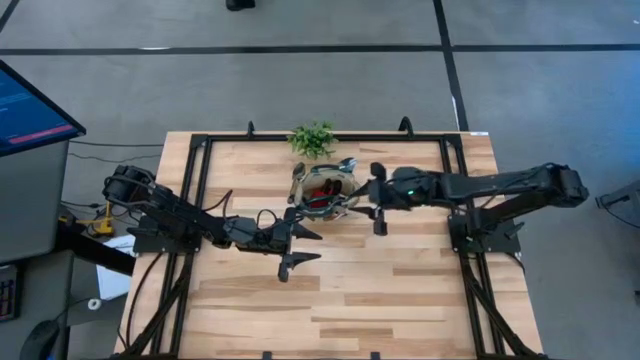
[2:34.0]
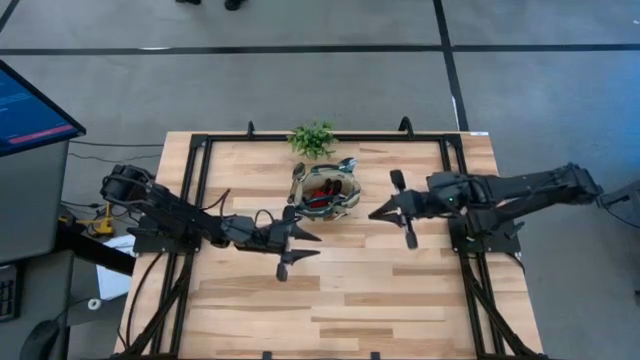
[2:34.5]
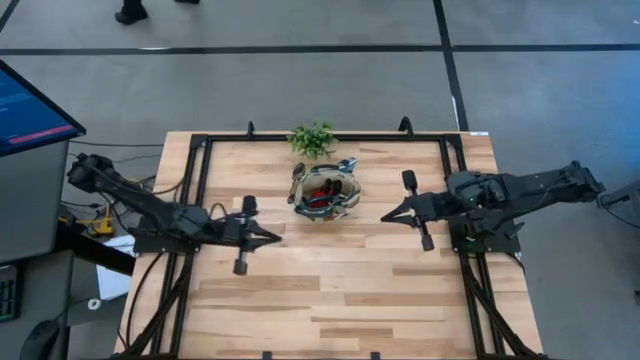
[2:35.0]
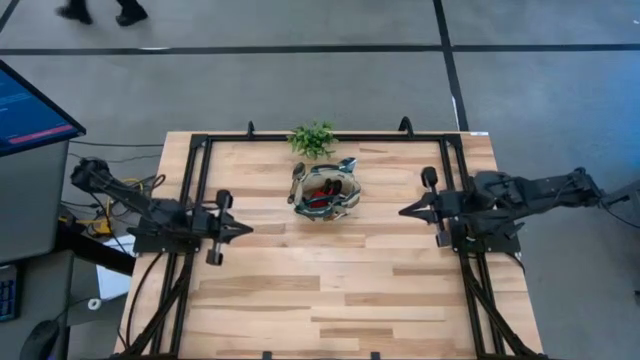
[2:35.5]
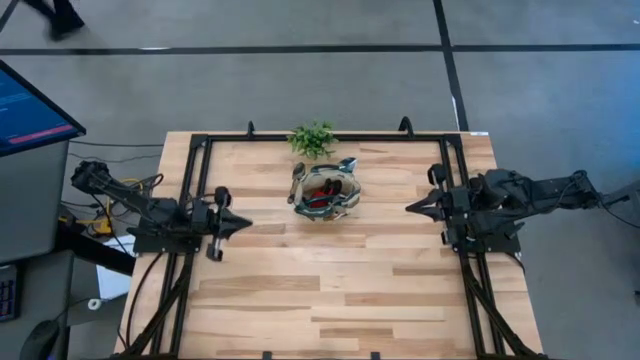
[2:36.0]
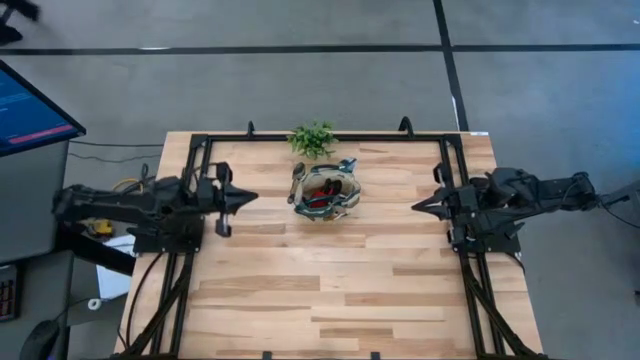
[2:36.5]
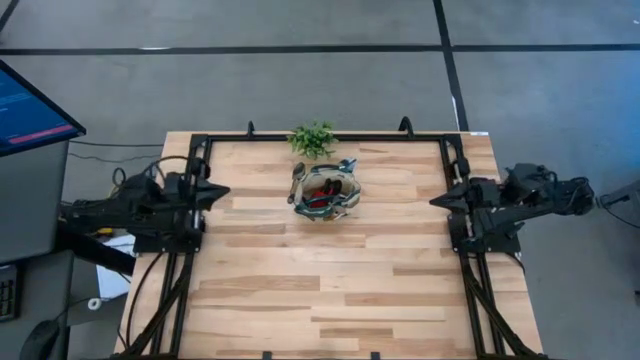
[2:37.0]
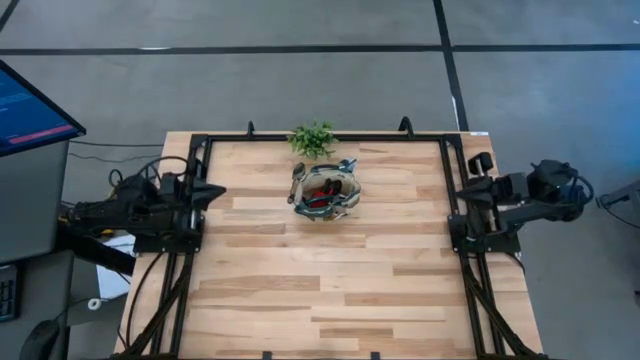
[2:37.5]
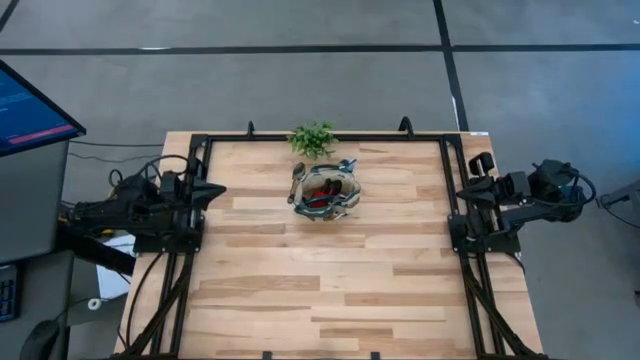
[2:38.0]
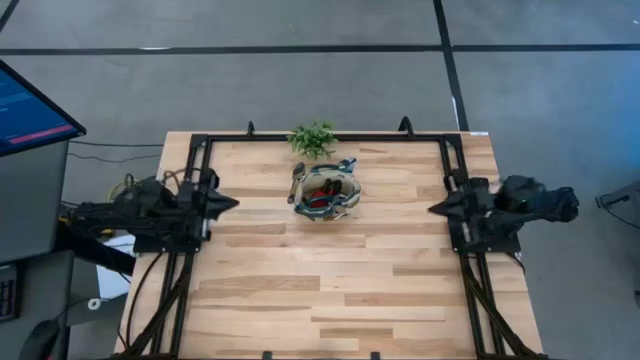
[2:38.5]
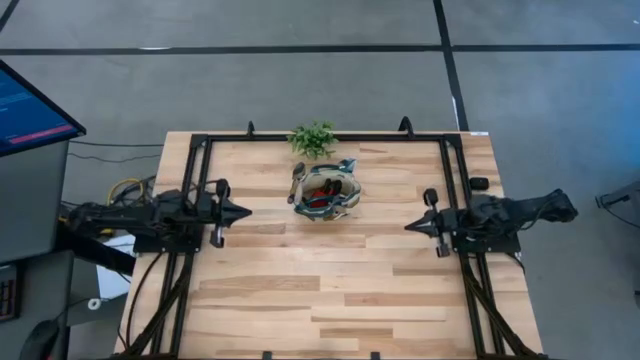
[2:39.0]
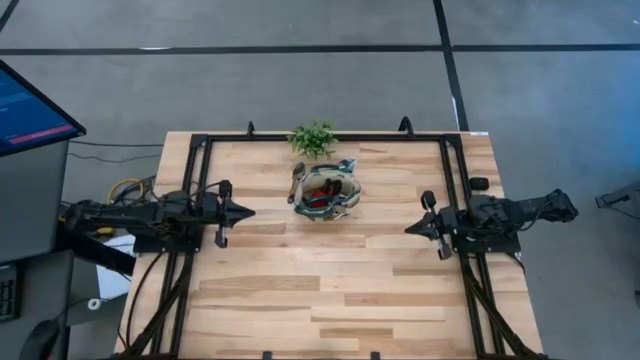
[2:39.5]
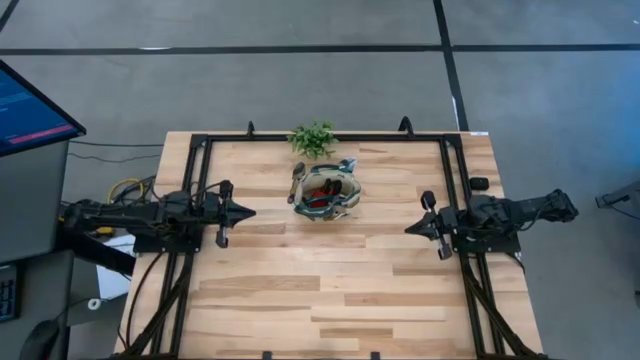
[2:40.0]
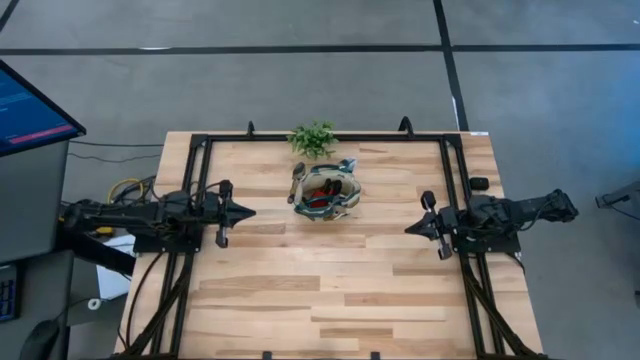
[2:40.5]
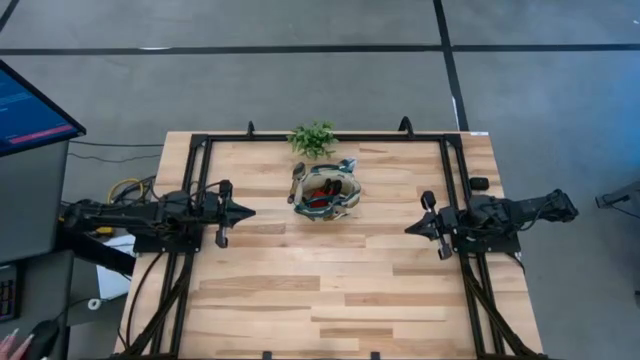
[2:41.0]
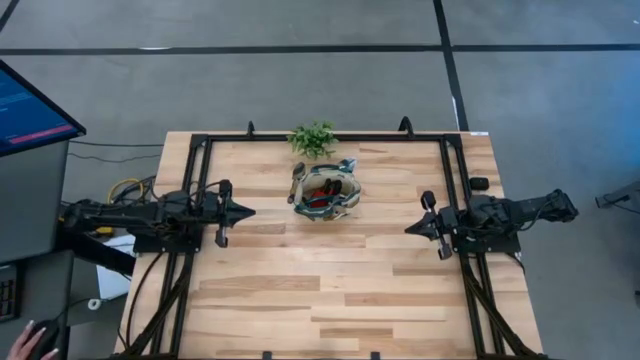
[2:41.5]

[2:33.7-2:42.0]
Task: Pick & Place Garden tools in Gardening bag
Return to Home Position

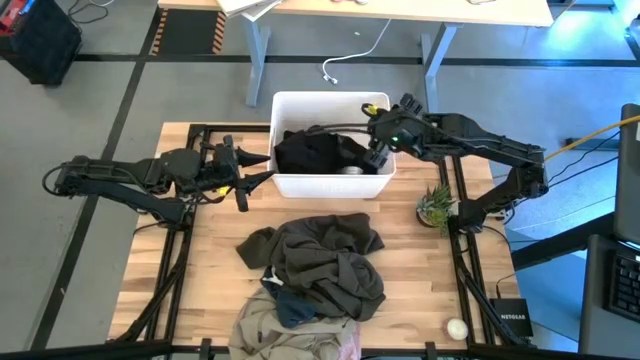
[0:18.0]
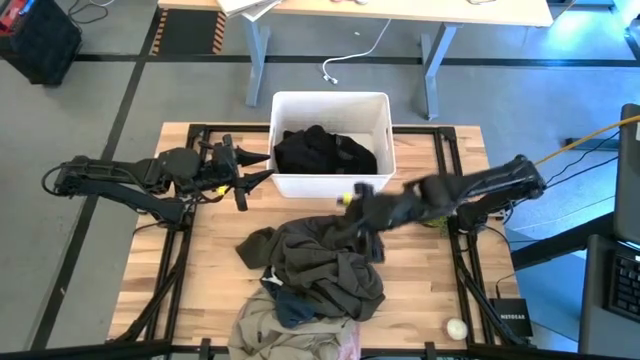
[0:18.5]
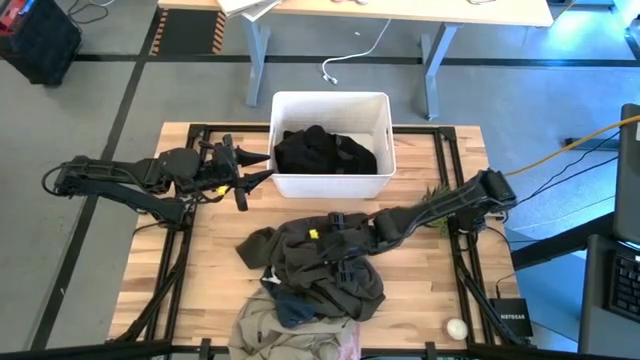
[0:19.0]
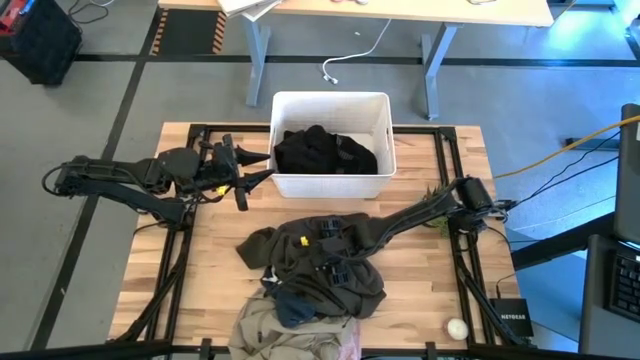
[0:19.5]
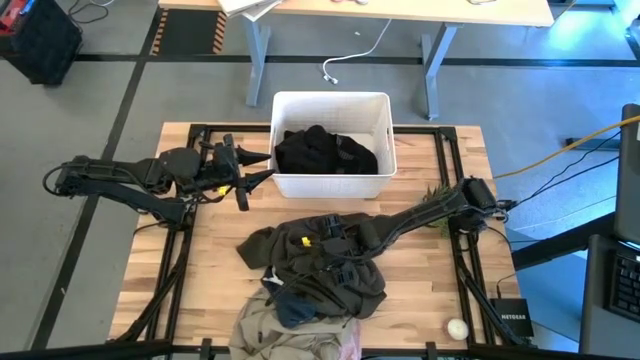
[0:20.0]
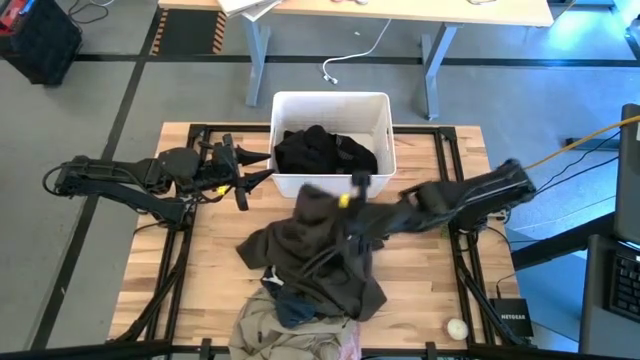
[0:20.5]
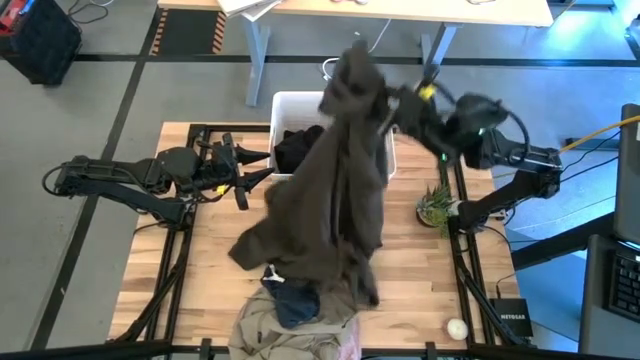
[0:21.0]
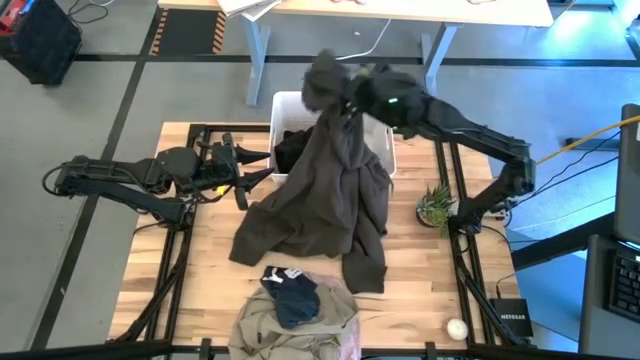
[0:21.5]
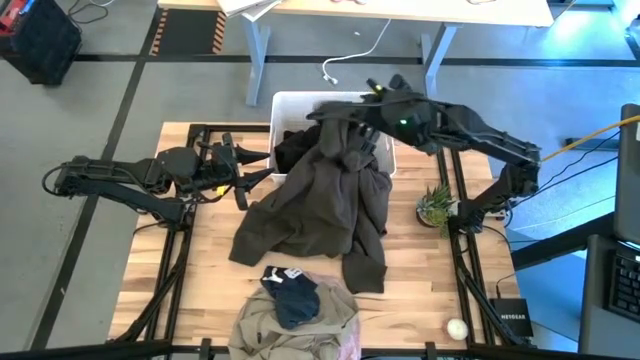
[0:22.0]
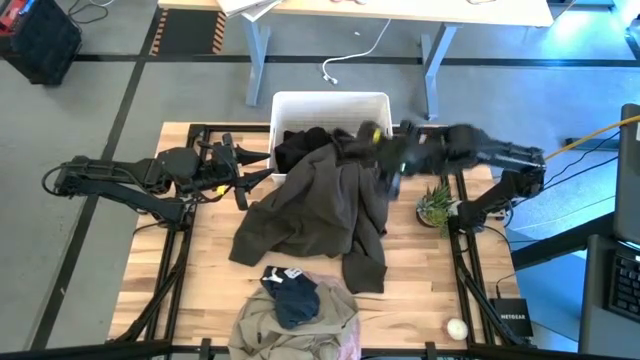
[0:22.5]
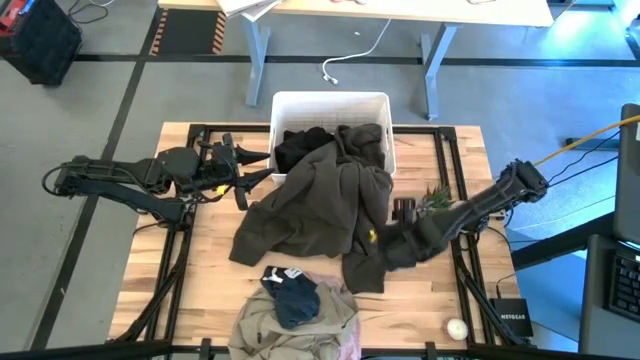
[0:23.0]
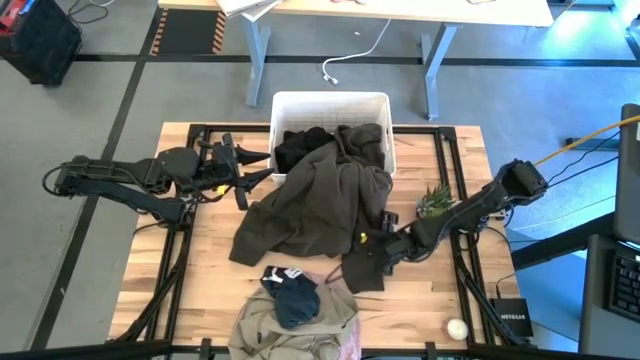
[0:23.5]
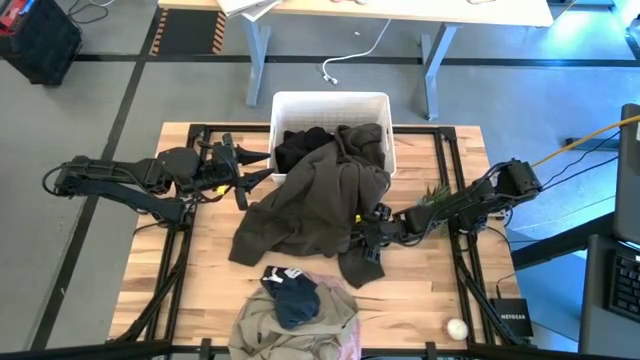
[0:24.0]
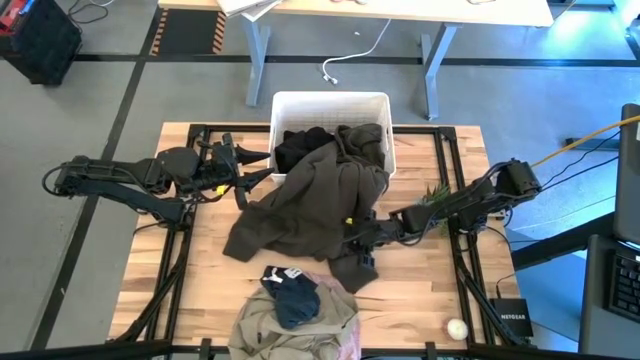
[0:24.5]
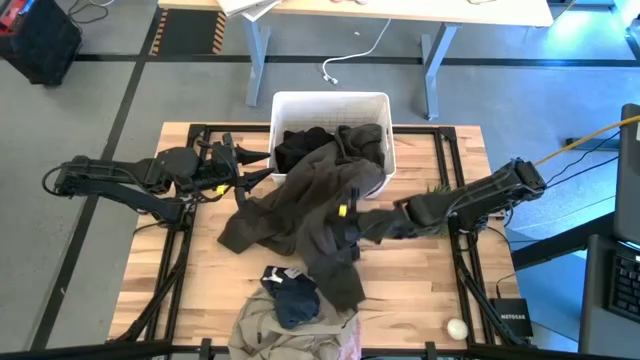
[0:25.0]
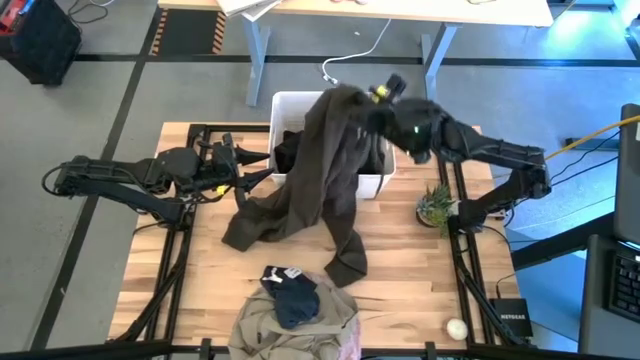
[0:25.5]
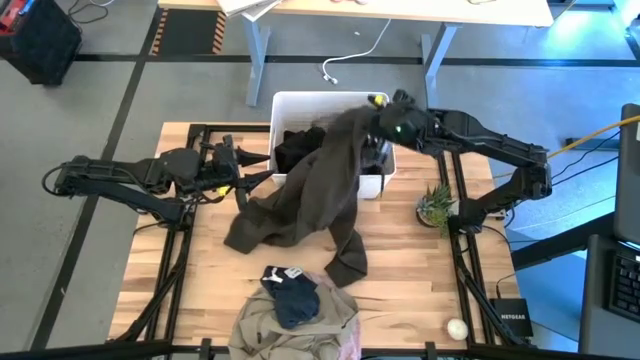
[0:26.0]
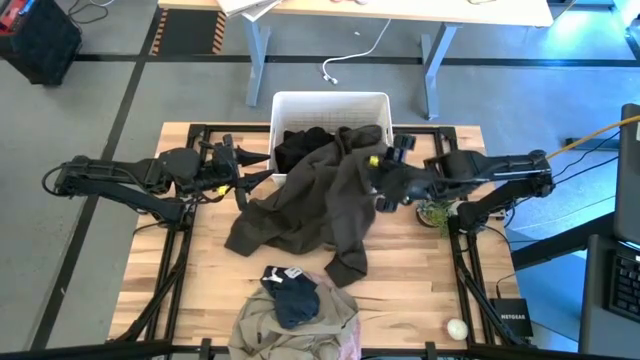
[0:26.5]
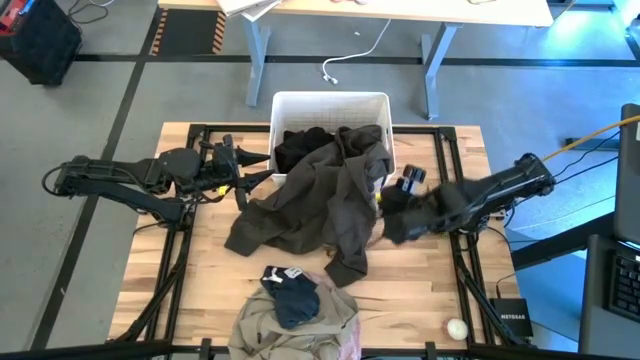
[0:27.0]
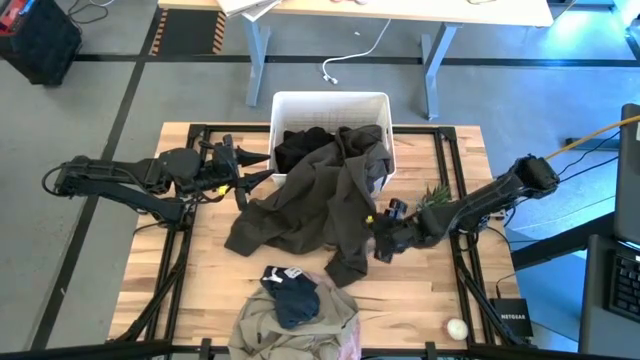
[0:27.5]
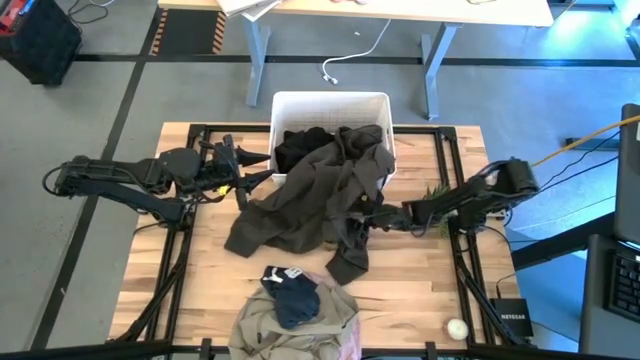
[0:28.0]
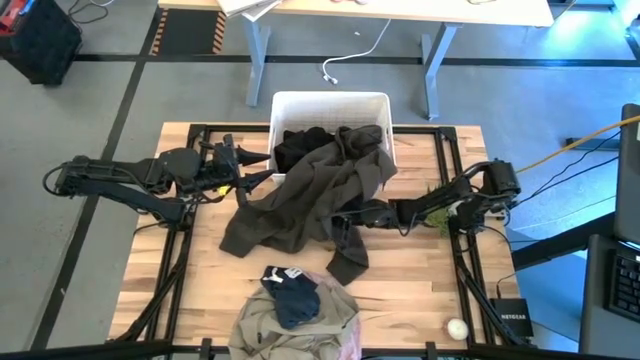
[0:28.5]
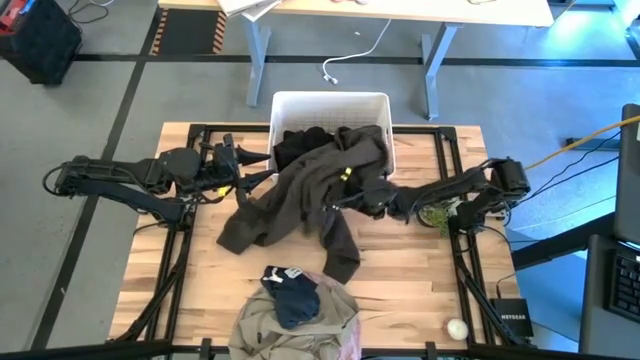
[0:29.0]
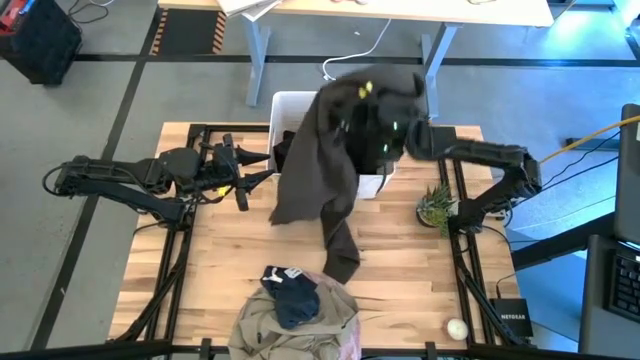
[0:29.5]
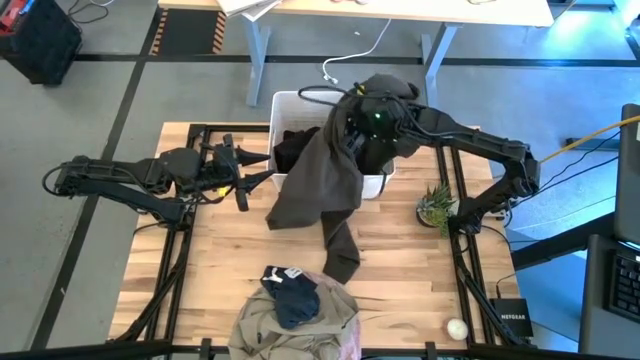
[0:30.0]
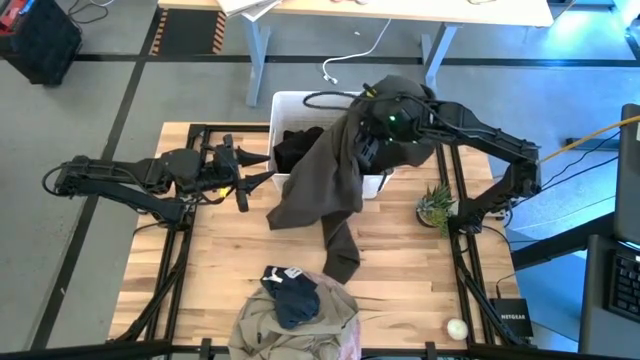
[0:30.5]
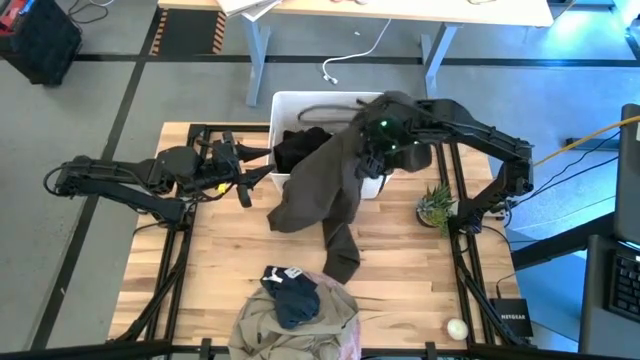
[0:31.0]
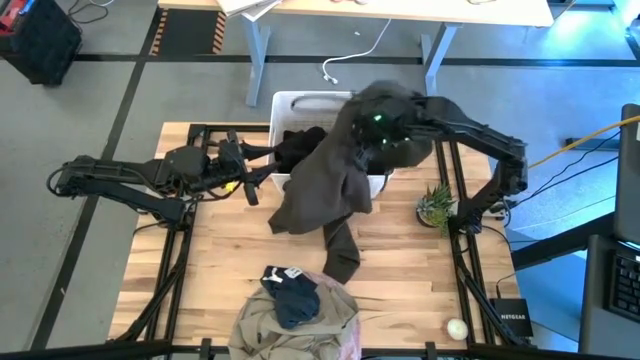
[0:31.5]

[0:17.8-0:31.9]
Task: Sort clothes
Put the brown jacket into the white bin
